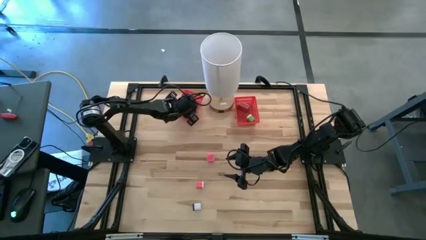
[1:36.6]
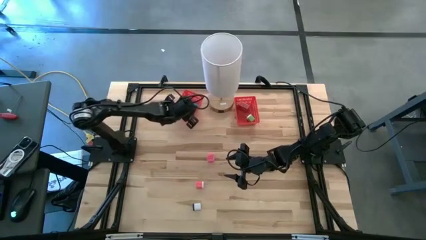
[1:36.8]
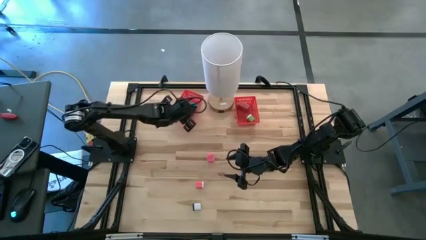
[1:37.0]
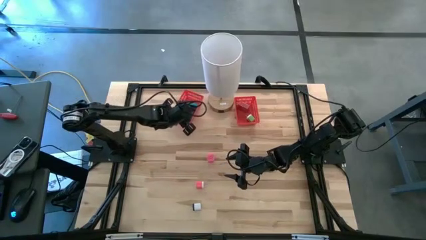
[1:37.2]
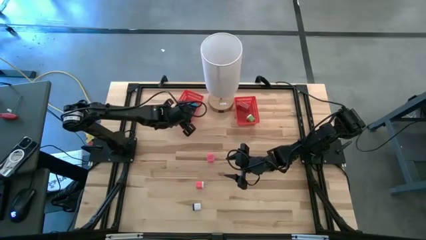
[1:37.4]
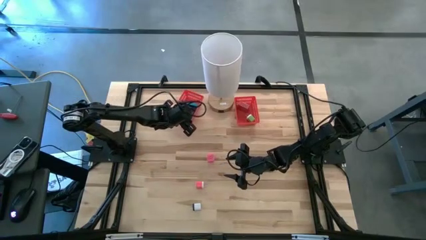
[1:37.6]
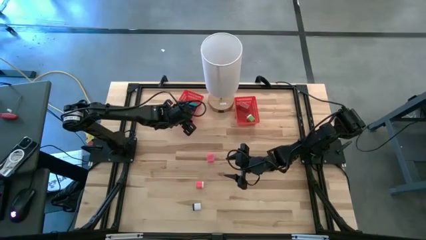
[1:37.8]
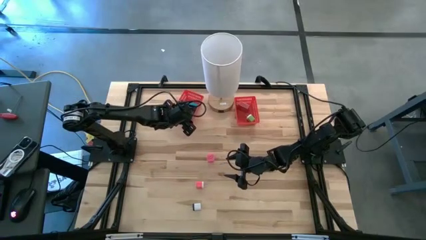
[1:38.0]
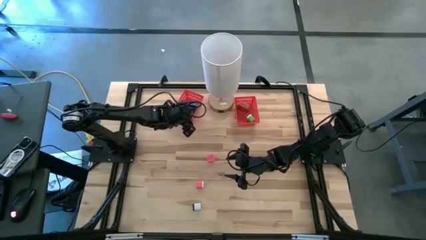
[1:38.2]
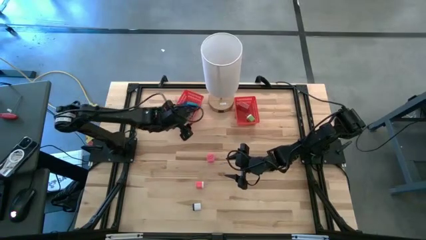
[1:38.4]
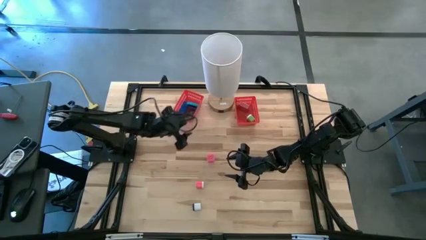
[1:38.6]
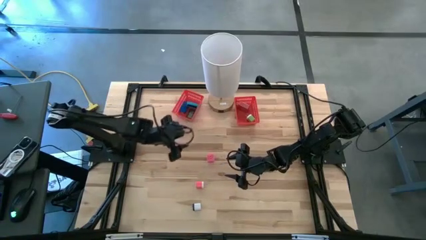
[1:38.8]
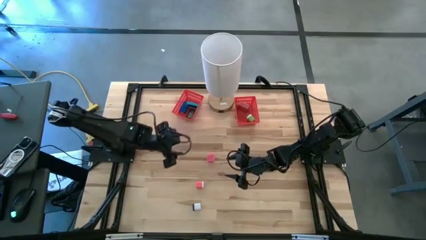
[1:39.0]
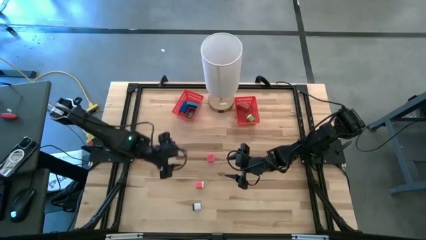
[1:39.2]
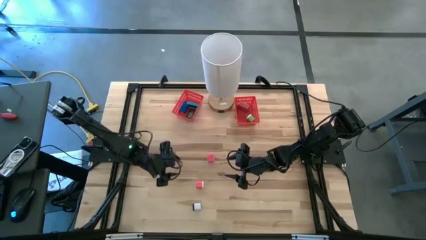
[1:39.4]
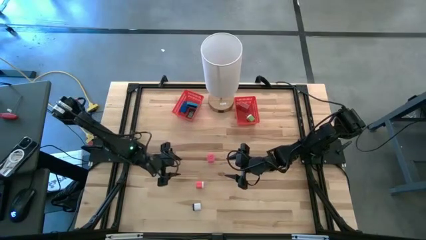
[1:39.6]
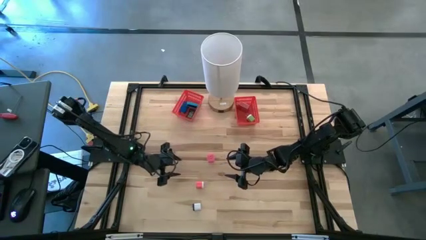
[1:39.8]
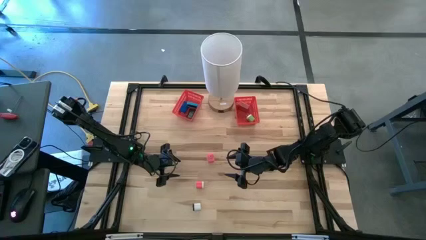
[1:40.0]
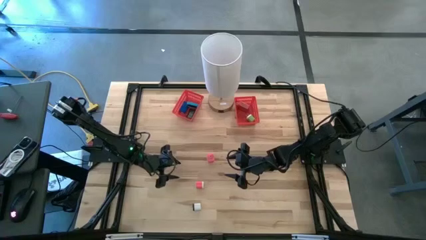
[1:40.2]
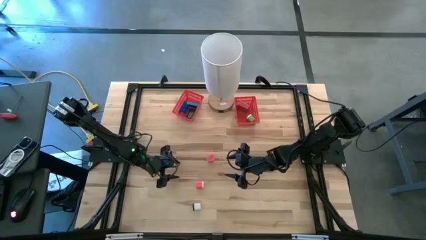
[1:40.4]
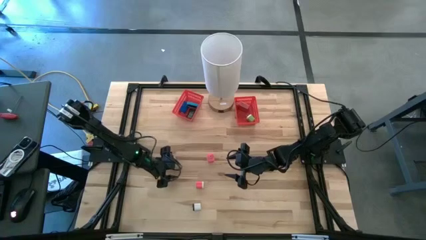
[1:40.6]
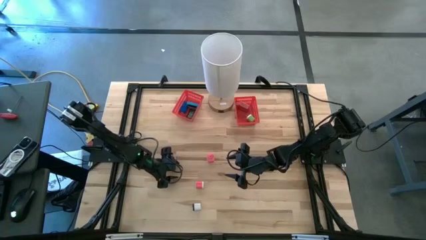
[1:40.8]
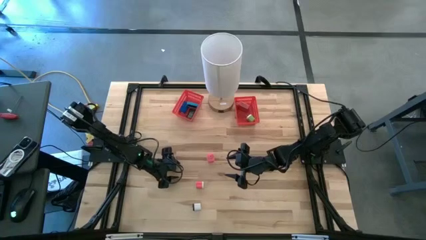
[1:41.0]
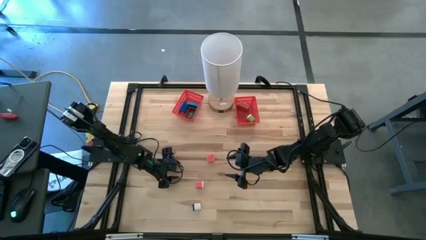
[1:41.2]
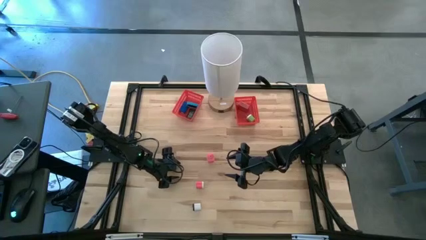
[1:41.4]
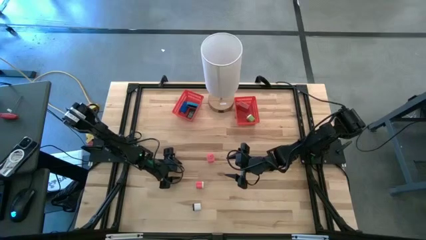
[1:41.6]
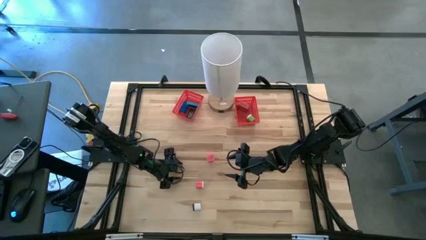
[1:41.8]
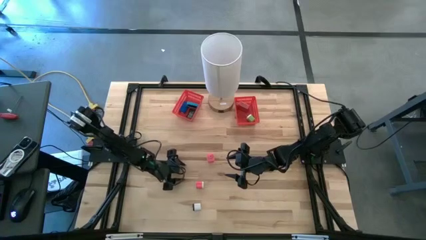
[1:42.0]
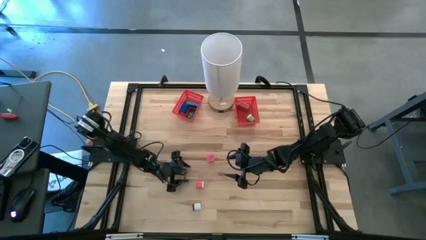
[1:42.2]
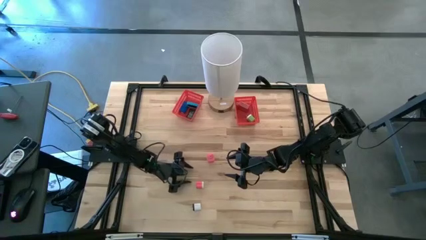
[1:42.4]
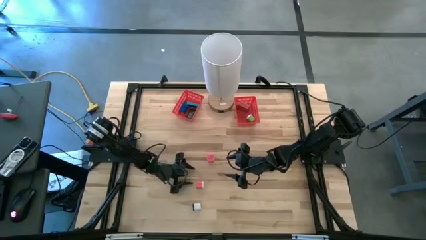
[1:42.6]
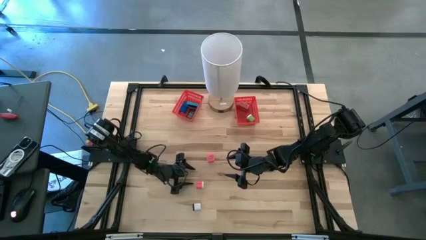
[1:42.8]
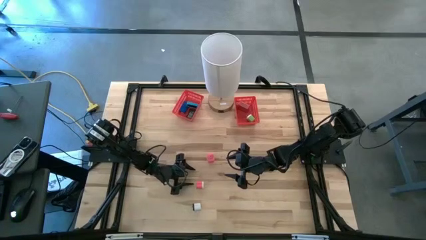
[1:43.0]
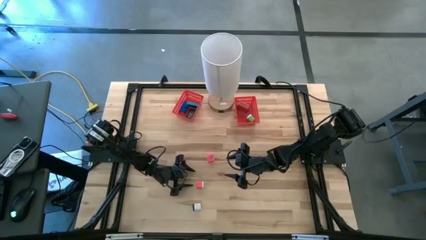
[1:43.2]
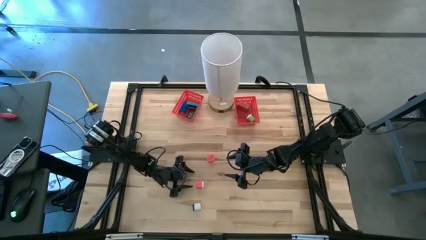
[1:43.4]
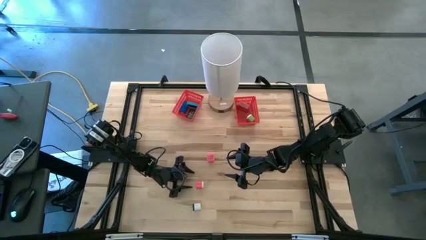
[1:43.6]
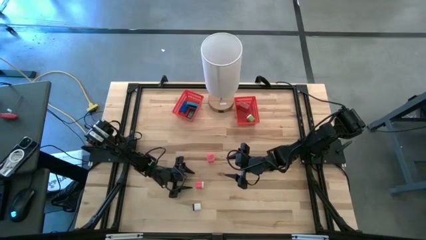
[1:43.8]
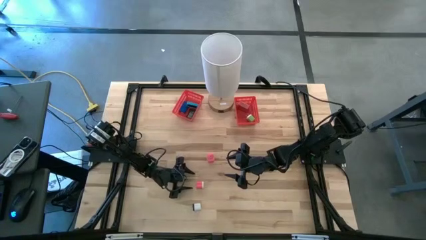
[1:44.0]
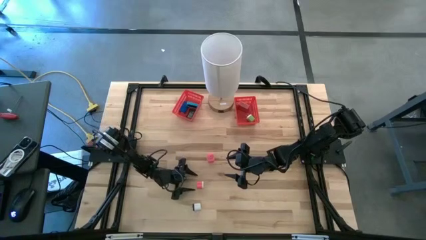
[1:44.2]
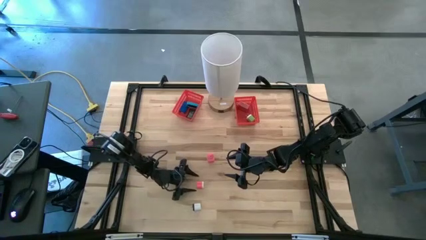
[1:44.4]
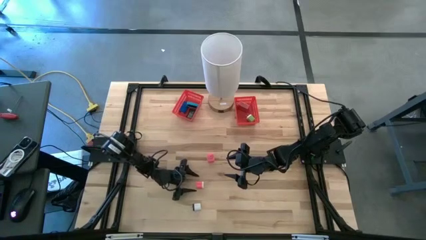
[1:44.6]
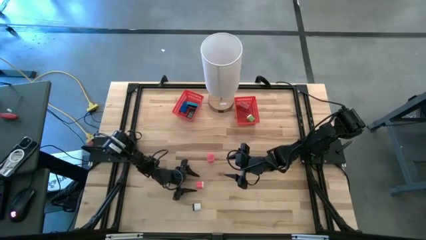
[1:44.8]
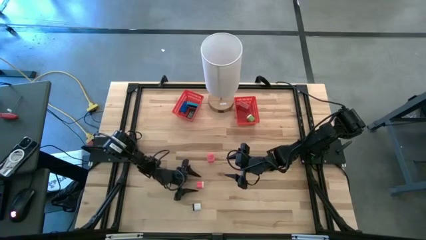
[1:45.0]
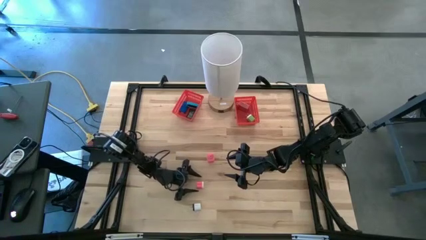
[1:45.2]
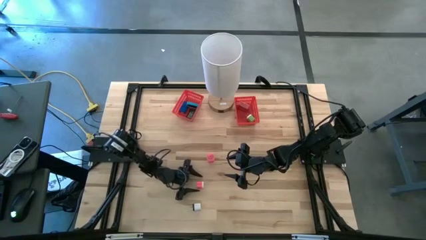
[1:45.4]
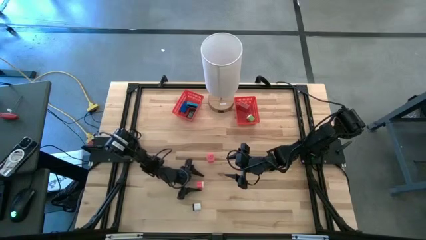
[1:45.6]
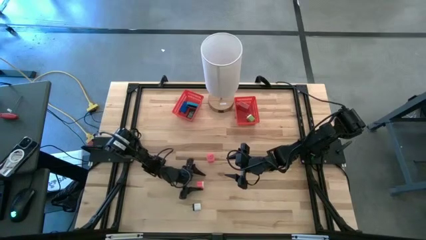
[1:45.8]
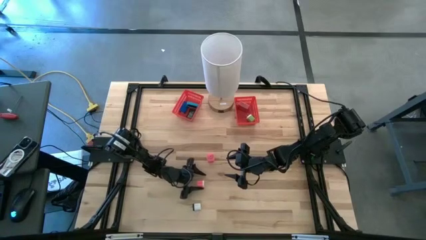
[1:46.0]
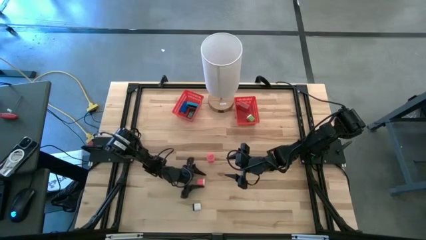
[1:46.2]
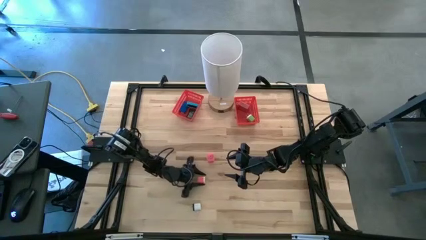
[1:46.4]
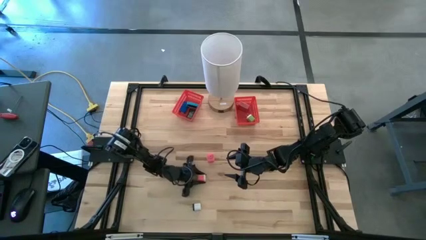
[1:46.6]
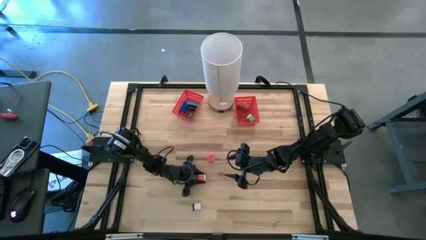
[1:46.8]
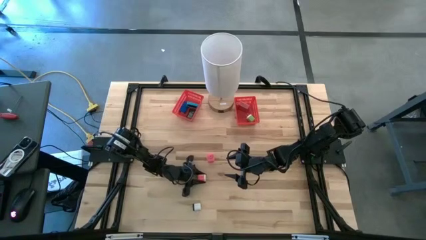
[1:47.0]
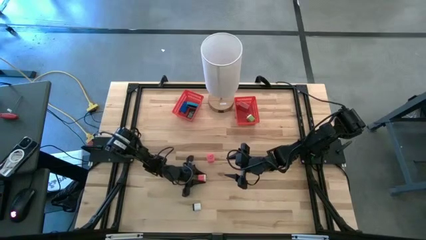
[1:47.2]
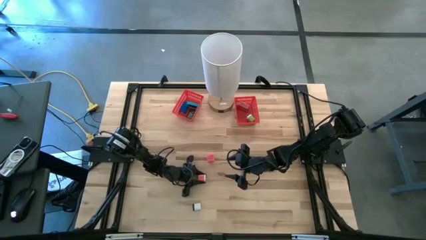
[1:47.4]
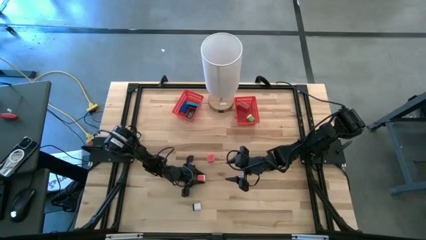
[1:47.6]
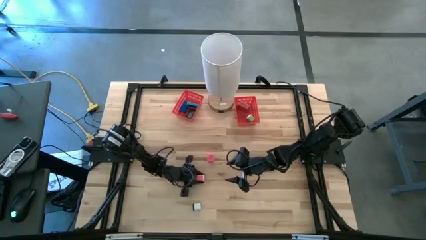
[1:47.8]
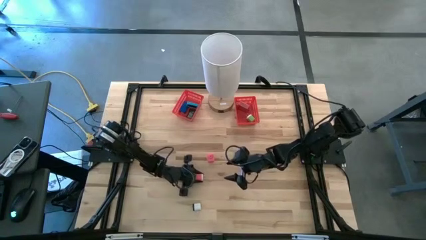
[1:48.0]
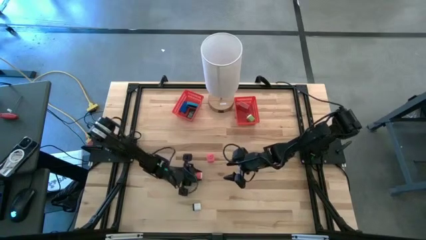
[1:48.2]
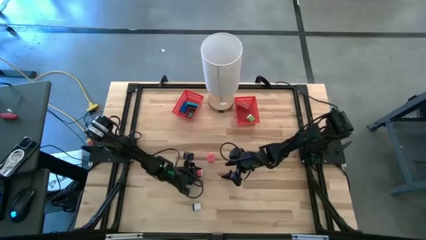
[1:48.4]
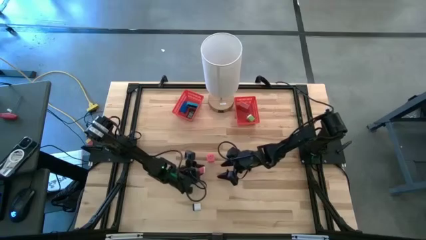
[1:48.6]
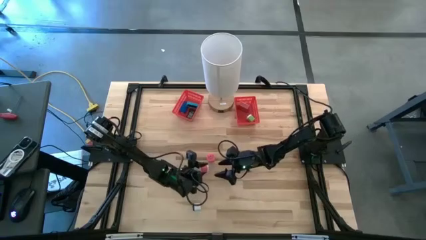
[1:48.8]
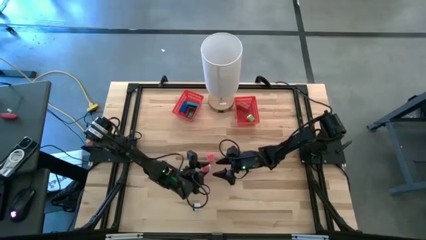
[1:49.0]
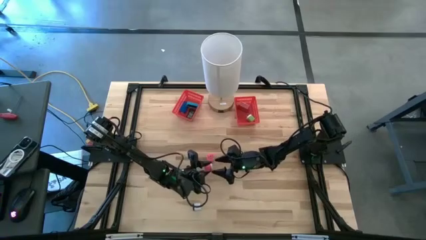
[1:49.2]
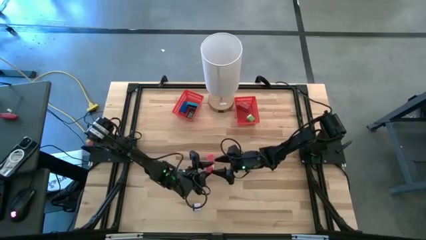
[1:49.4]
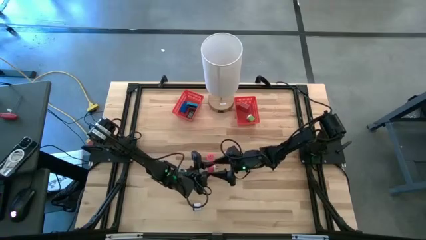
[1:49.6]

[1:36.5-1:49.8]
Task: Sort adapters and digital timers
Put the red charger adapter into the right red bin

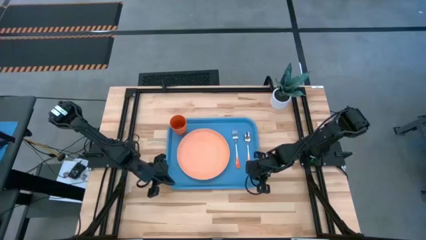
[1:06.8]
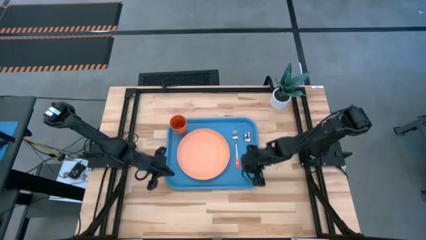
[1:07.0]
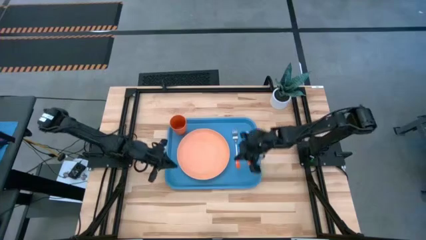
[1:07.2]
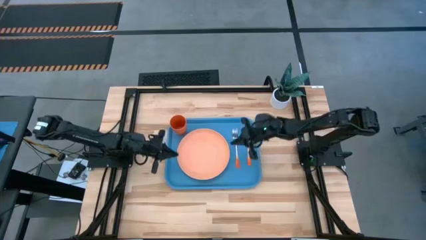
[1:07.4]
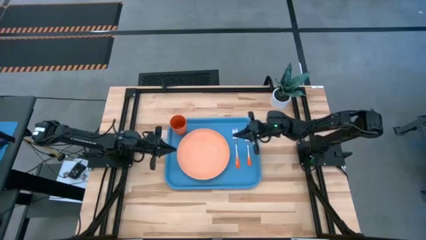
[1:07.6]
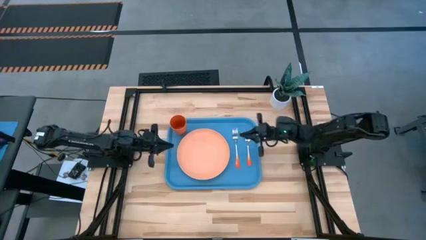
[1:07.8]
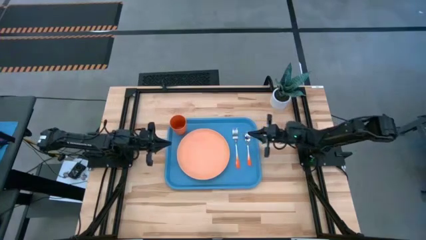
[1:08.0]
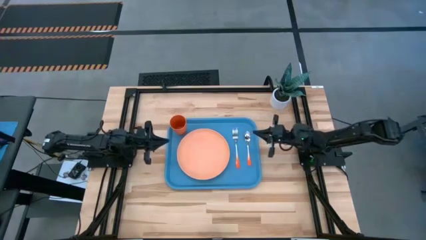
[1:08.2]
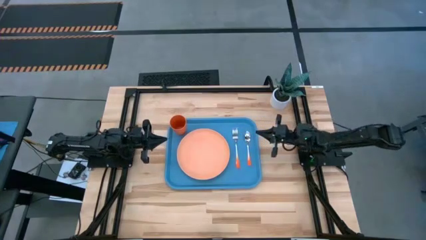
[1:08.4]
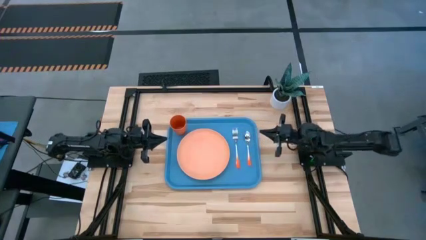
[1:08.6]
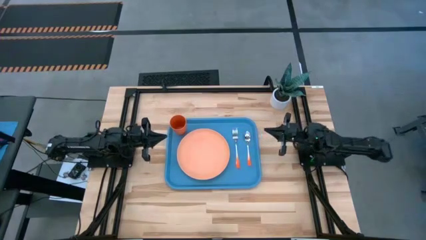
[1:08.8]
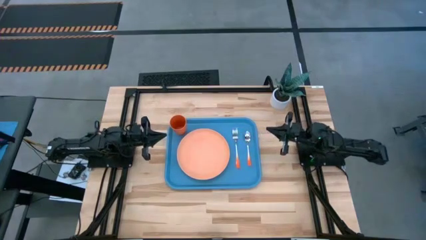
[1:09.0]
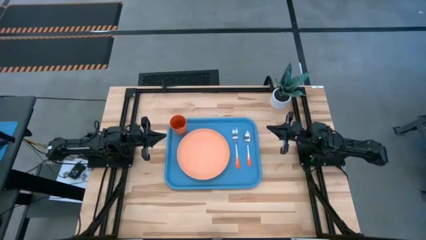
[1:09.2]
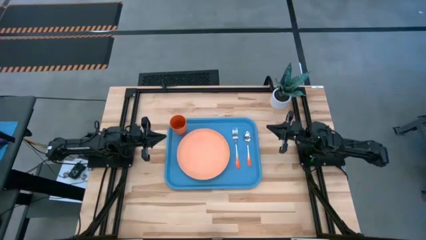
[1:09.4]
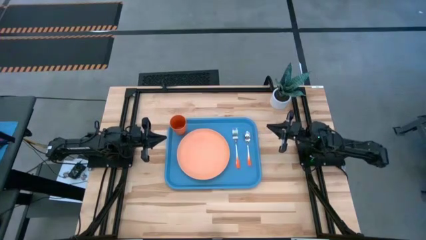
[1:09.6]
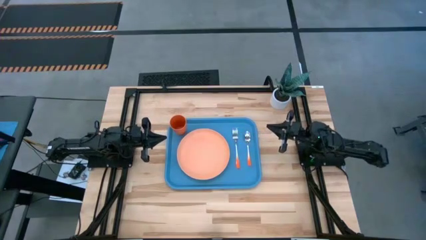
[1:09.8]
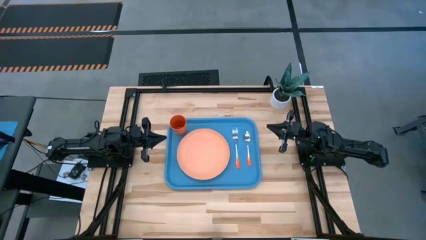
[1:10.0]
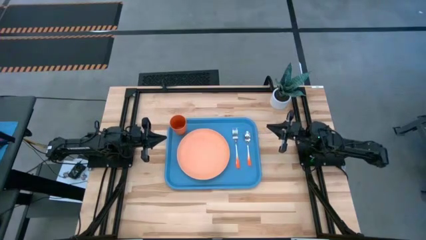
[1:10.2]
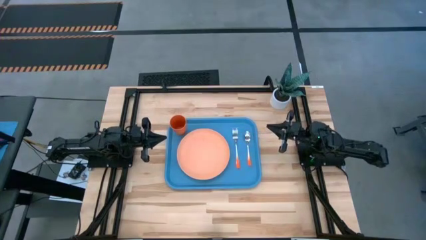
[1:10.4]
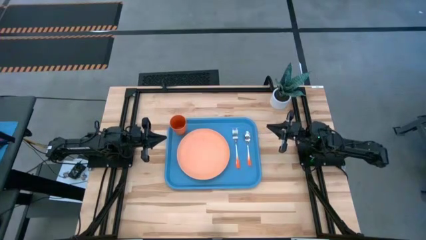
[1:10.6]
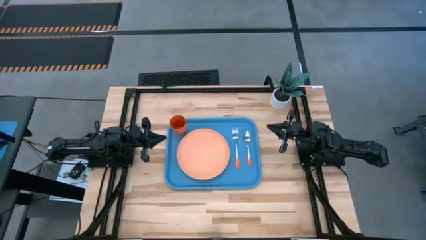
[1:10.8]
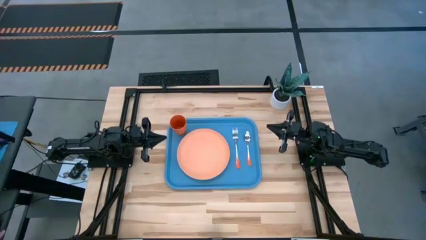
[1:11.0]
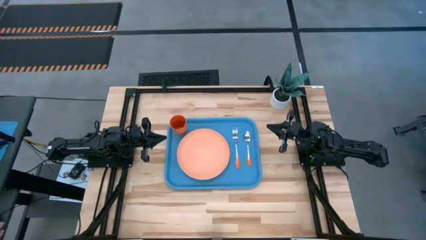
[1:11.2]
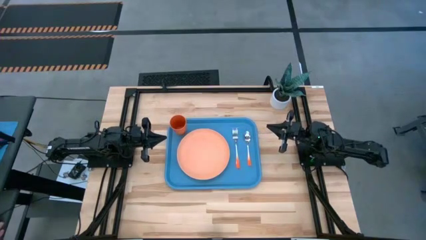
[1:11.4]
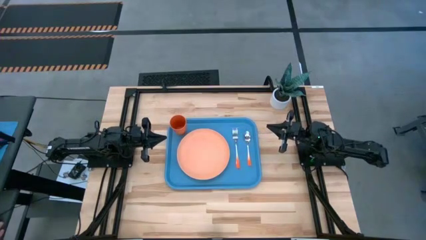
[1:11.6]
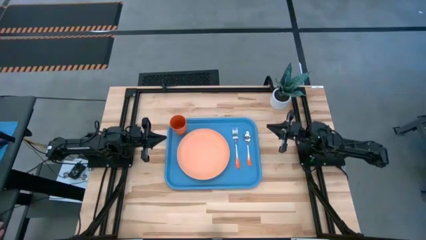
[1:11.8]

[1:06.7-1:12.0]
Task: Pick and place plate/cup/fork/spoon on tray
Return to Home Position
